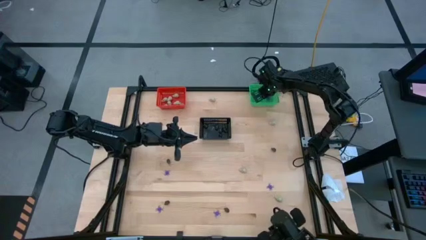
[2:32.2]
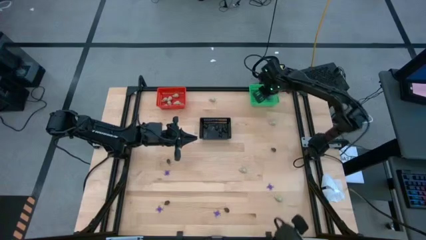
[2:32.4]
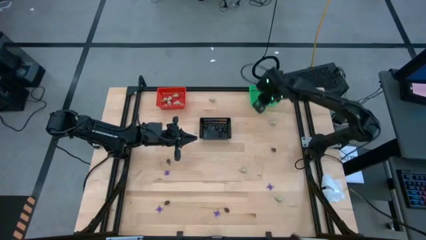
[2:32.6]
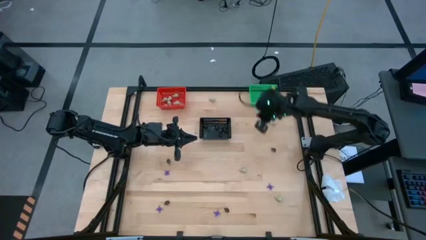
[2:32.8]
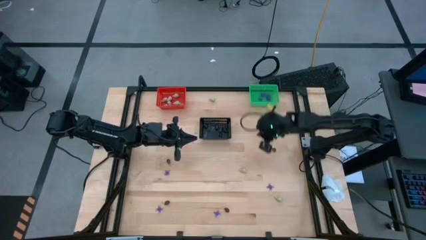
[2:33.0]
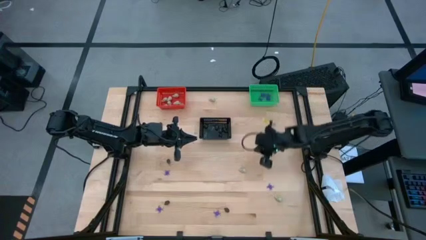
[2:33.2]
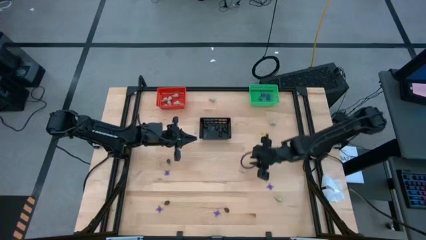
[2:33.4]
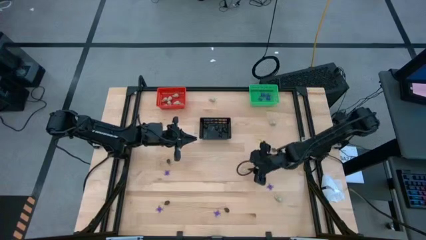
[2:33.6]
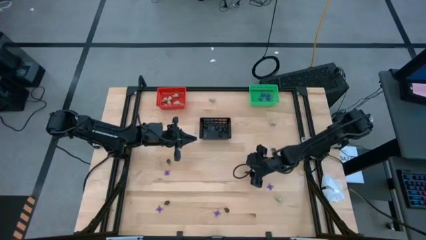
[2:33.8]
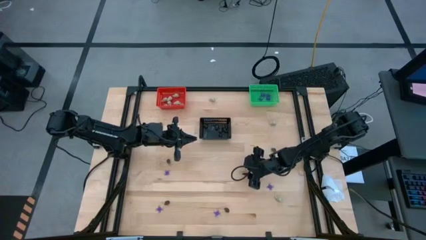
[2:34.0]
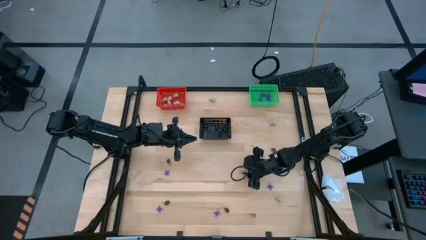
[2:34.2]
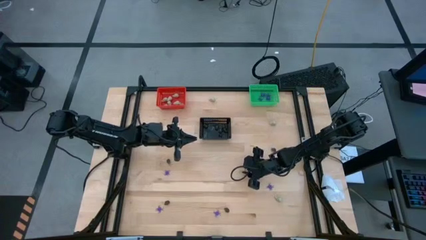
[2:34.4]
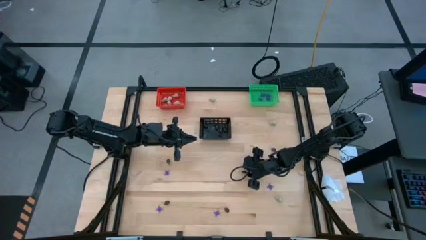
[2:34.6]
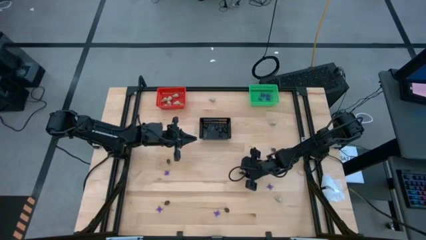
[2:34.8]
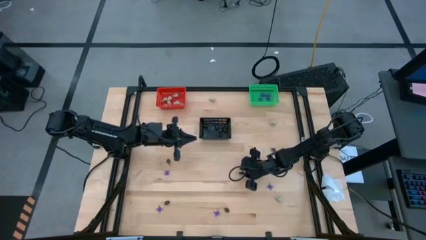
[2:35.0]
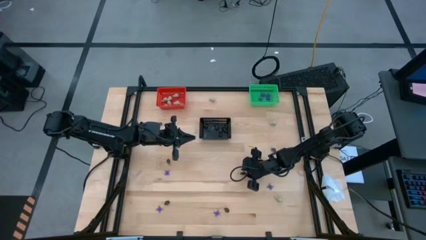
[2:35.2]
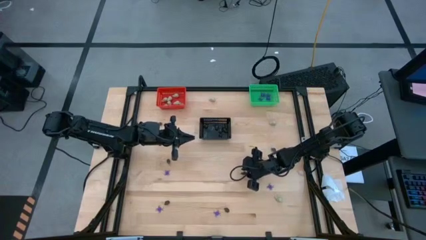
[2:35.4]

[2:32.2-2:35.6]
Task: Sort Halloween decoration
Put the white skull toy into the orange bin

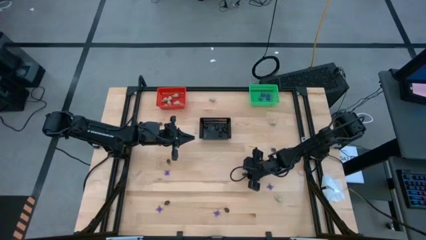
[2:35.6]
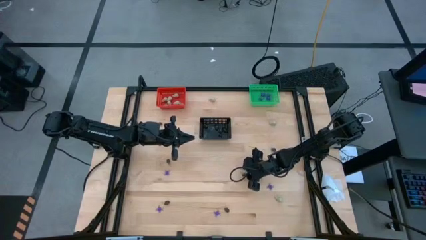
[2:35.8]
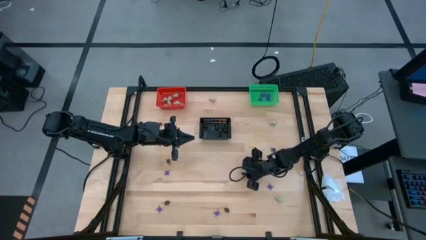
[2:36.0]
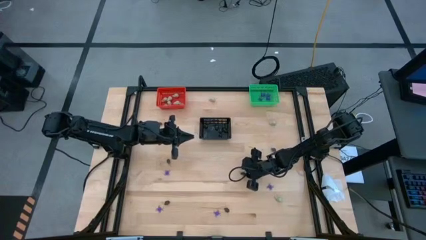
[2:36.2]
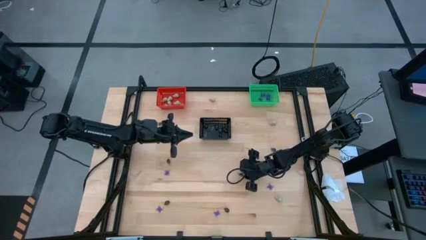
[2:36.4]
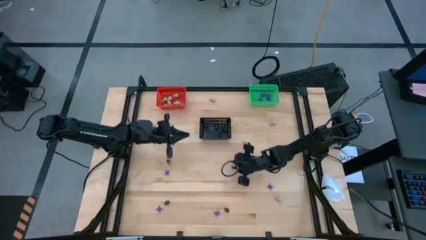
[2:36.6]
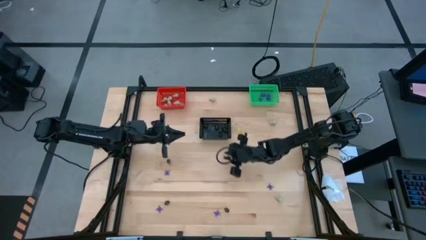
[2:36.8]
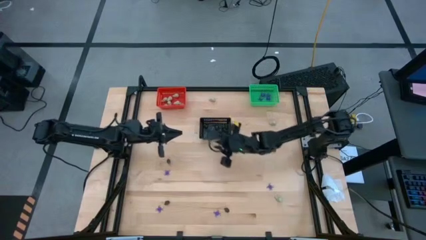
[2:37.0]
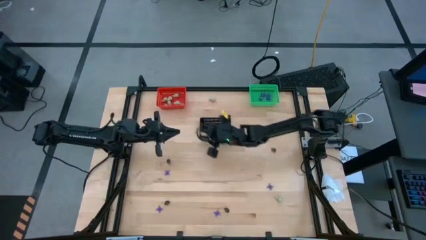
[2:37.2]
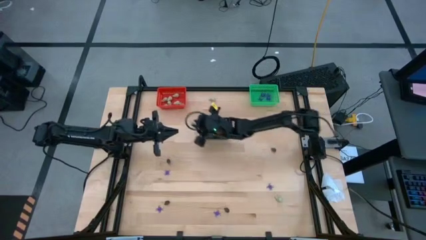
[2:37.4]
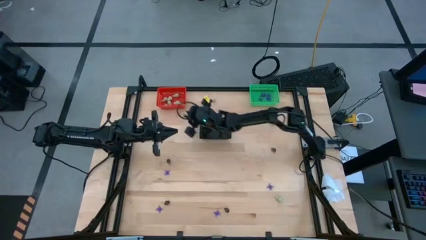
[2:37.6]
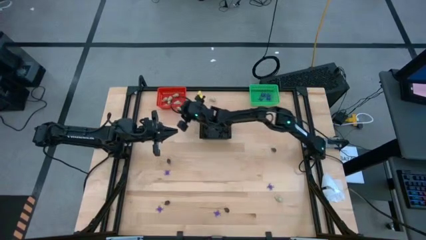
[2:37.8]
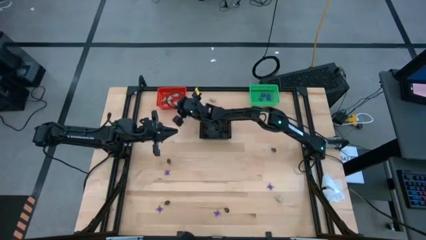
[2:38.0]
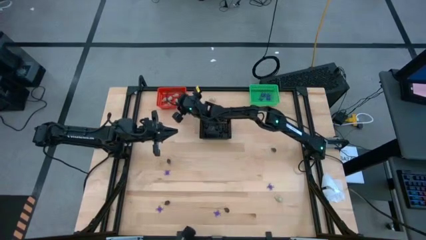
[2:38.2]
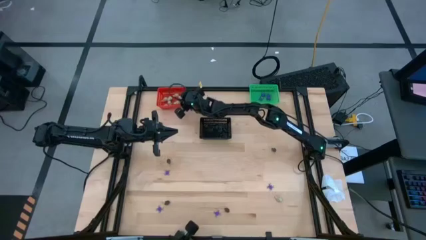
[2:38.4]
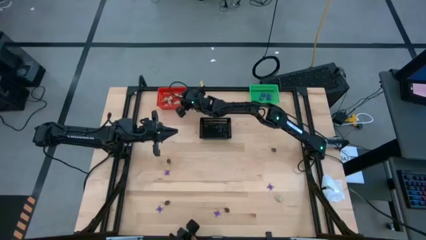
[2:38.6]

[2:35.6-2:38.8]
Put the white skull toy into the orange bin

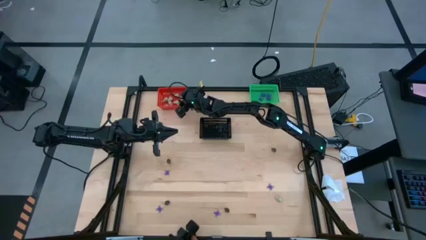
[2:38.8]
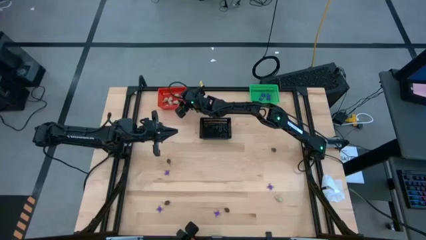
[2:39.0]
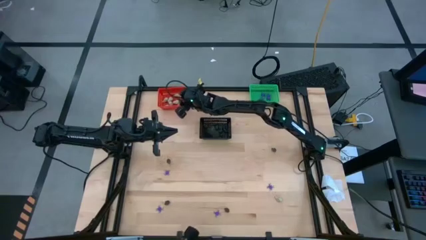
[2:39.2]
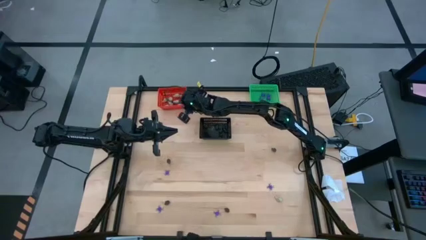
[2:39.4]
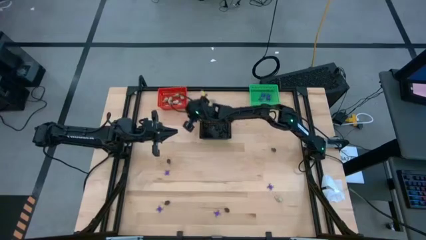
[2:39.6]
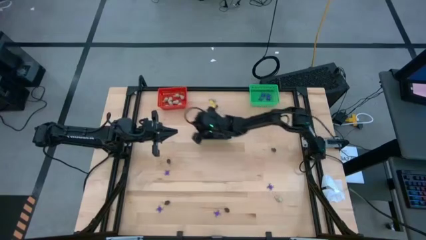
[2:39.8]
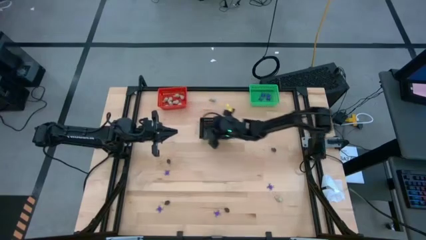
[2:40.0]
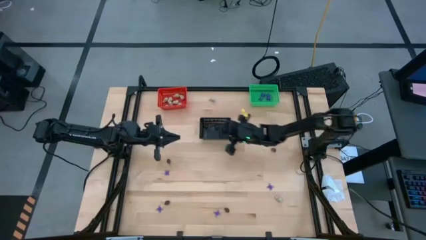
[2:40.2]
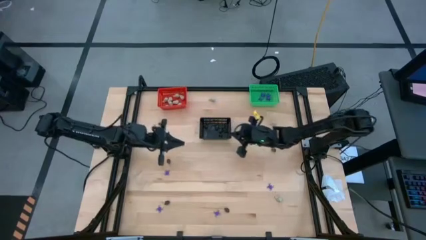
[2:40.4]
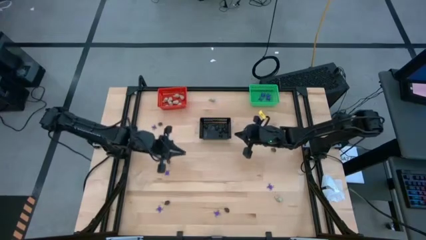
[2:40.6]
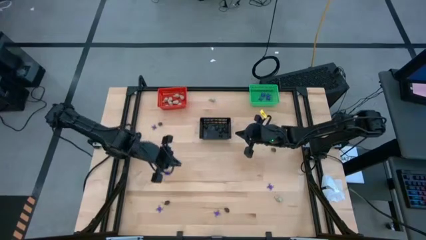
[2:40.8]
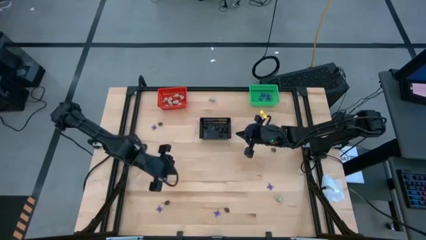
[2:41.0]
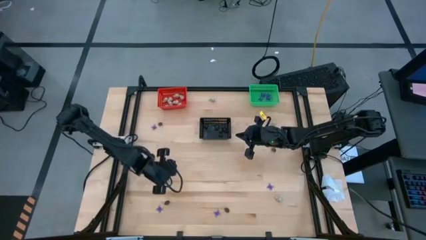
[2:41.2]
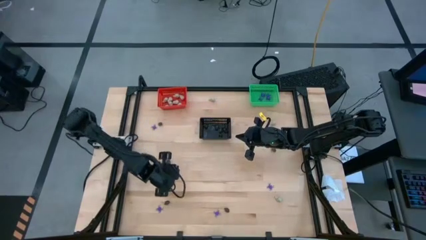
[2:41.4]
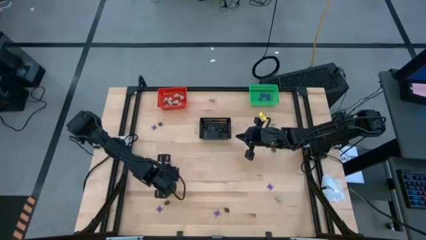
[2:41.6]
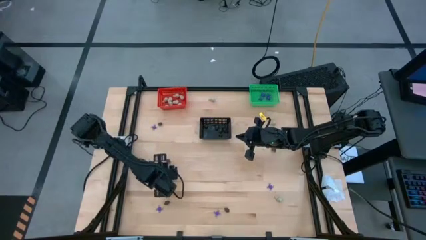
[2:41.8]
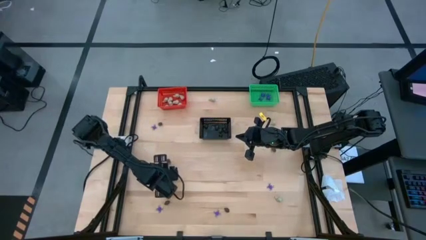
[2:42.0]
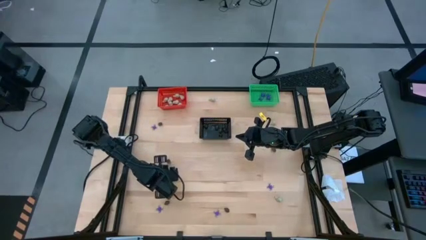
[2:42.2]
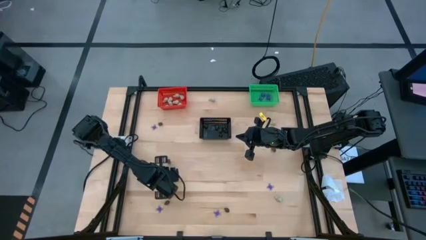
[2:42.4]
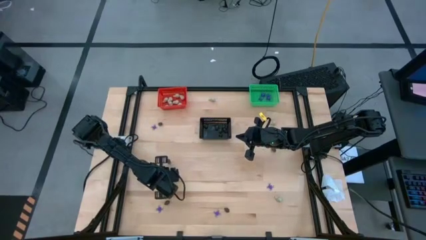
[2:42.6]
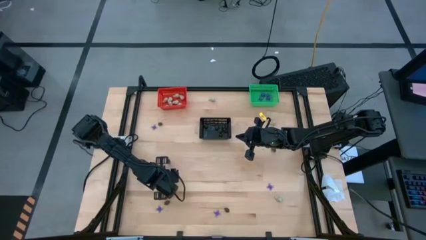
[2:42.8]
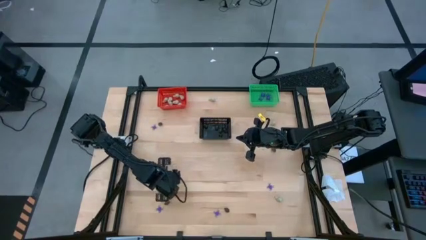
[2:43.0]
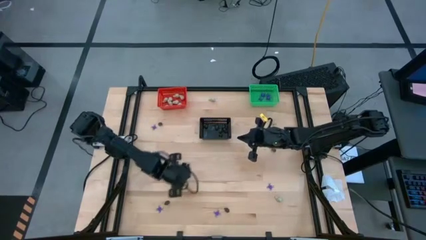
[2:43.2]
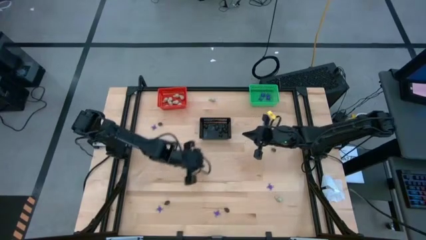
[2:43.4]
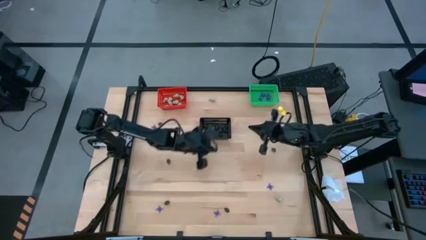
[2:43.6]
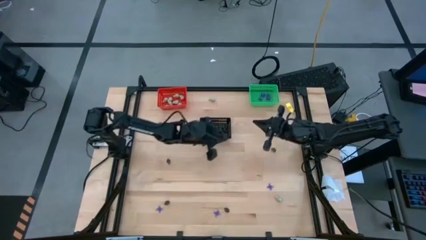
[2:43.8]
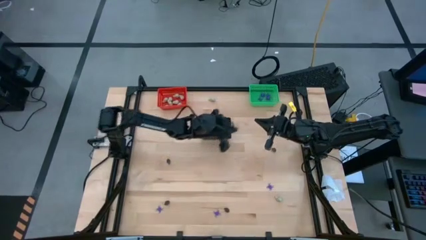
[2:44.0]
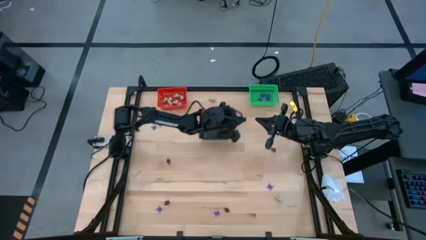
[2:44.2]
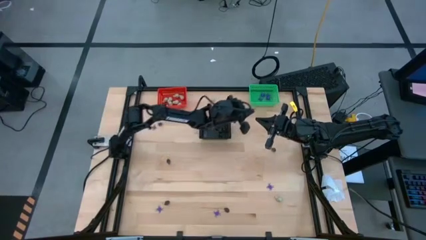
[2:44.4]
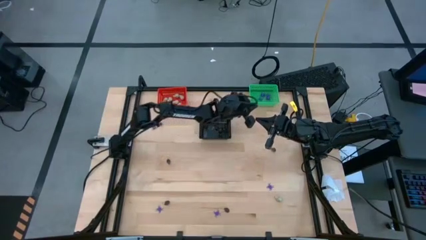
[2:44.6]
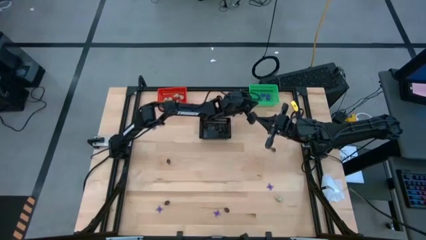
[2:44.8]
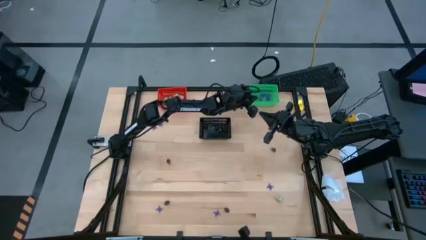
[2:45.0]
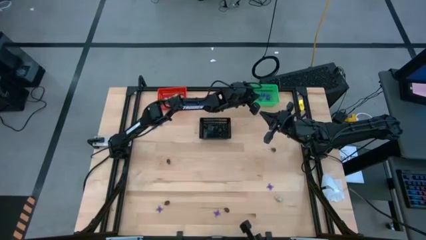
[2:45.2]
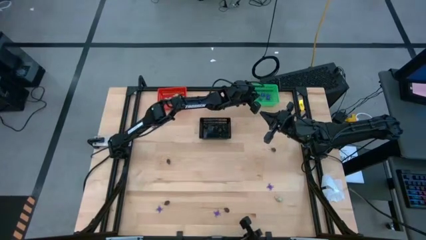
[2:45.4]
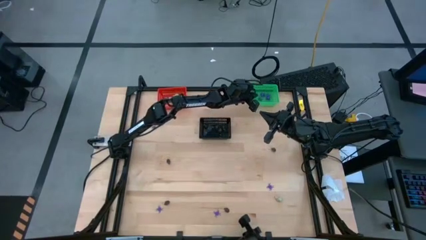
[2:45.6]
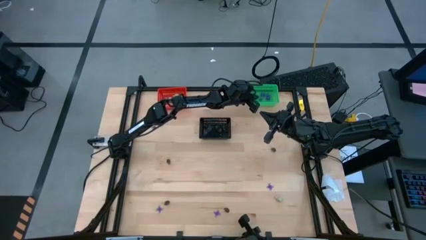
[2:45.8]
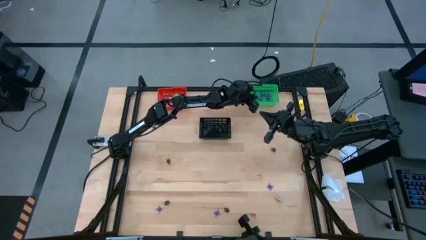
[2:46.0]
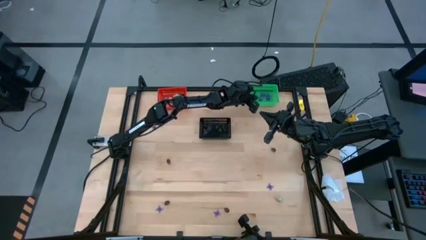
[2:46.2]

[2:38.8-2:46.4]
Put the violet spider toy into the green bin
